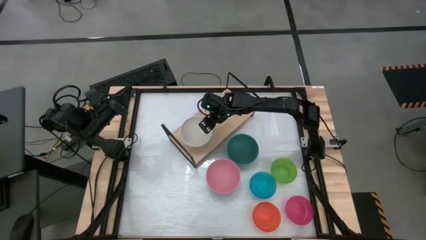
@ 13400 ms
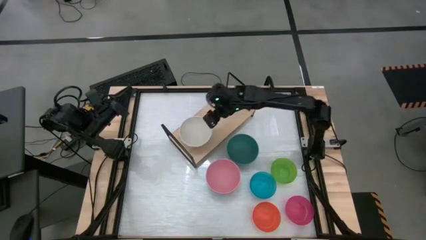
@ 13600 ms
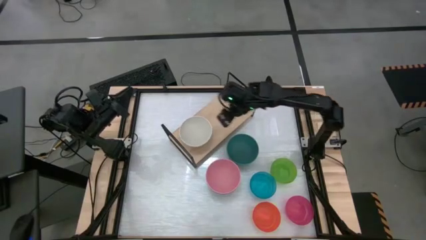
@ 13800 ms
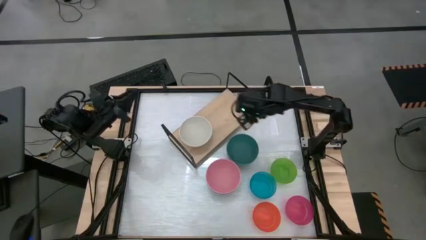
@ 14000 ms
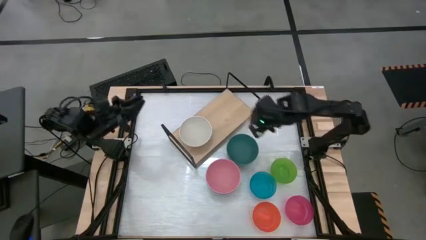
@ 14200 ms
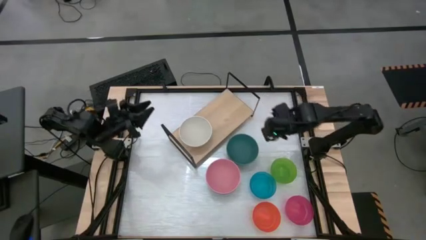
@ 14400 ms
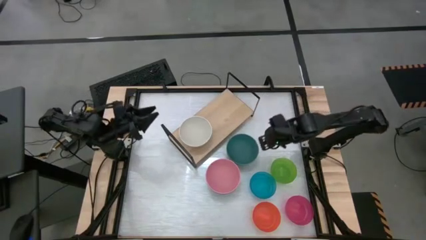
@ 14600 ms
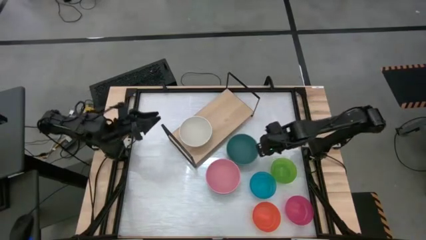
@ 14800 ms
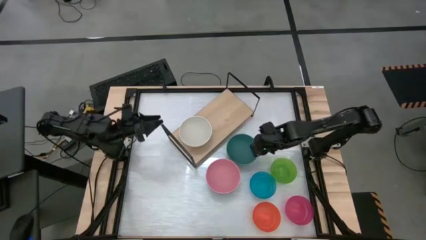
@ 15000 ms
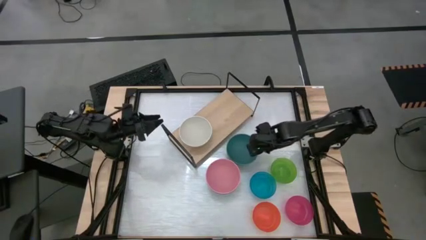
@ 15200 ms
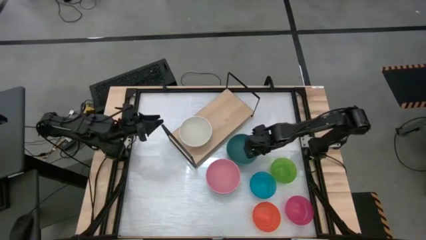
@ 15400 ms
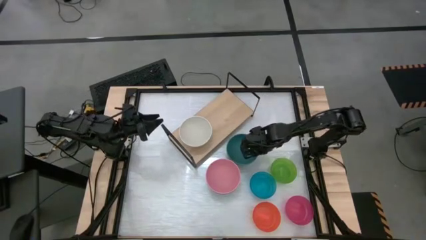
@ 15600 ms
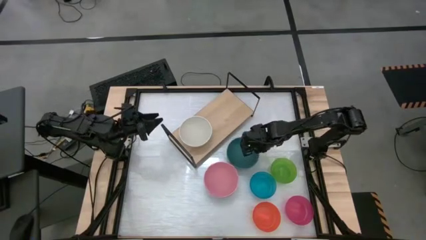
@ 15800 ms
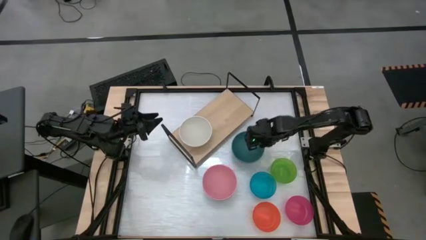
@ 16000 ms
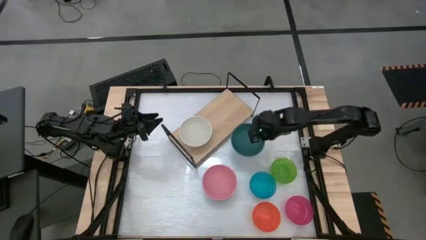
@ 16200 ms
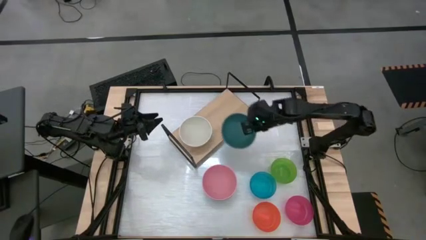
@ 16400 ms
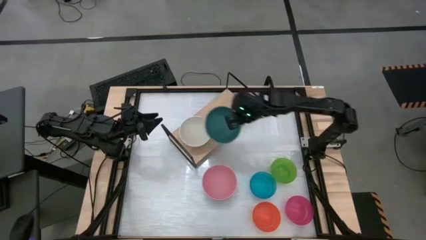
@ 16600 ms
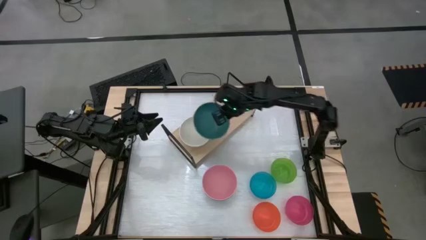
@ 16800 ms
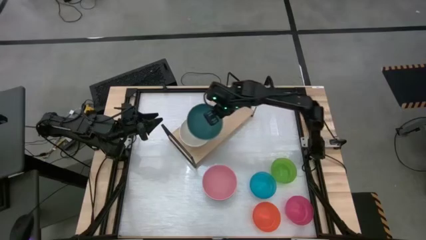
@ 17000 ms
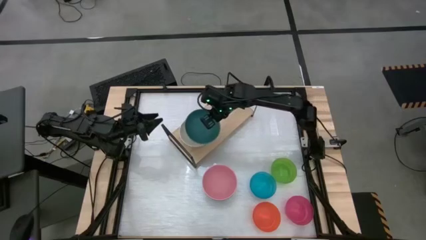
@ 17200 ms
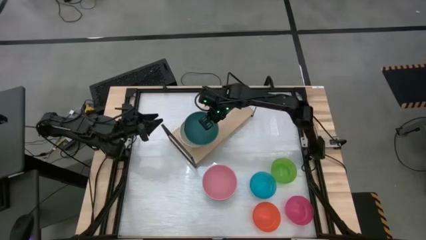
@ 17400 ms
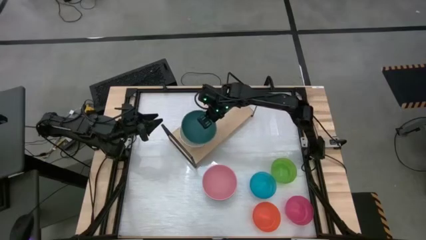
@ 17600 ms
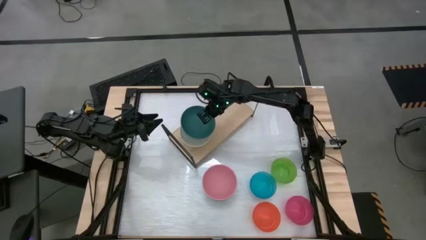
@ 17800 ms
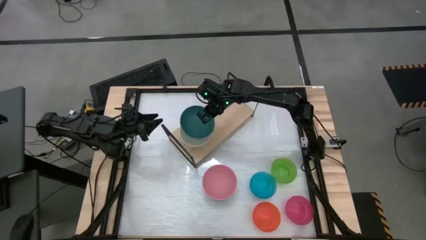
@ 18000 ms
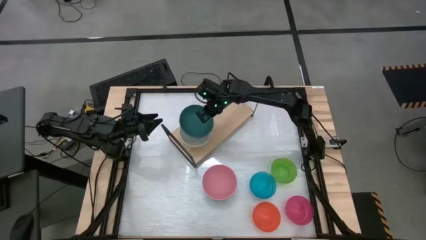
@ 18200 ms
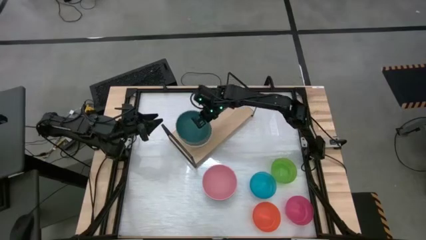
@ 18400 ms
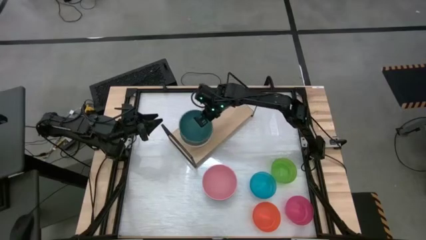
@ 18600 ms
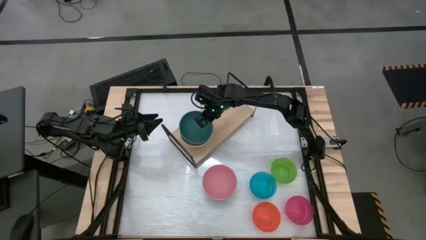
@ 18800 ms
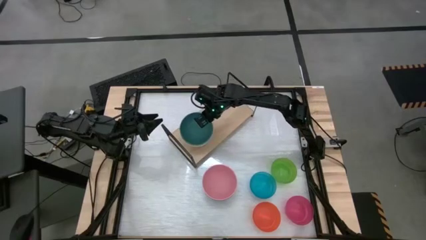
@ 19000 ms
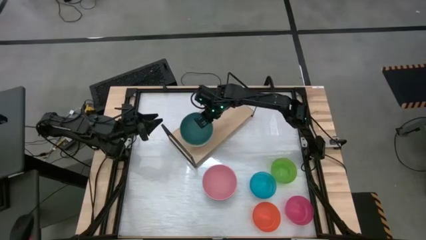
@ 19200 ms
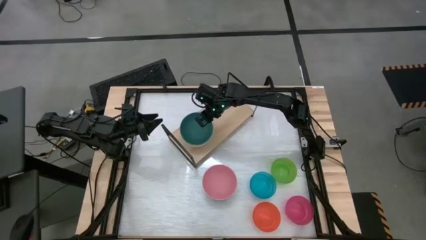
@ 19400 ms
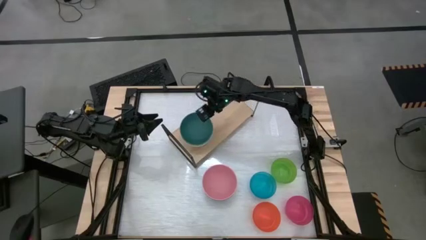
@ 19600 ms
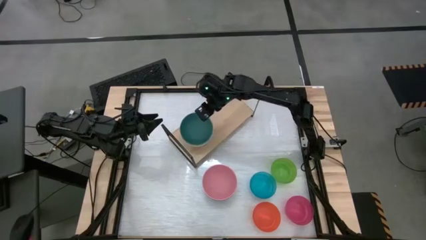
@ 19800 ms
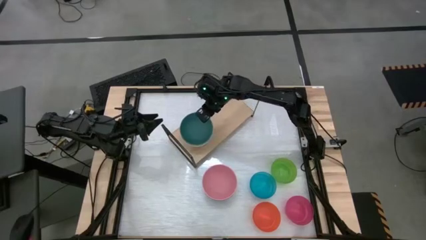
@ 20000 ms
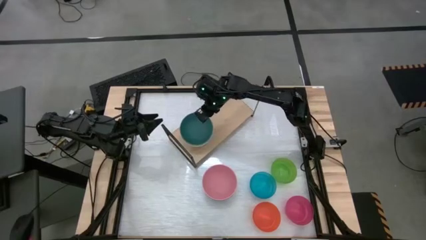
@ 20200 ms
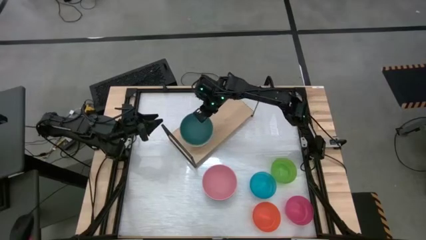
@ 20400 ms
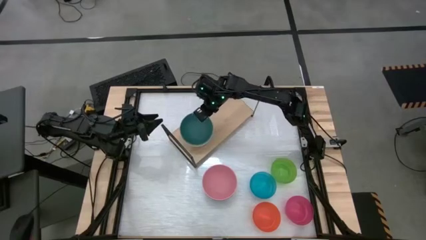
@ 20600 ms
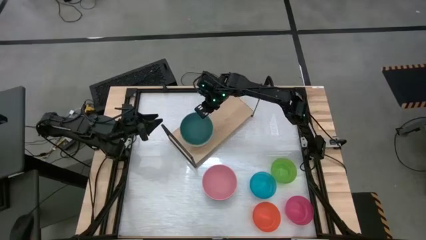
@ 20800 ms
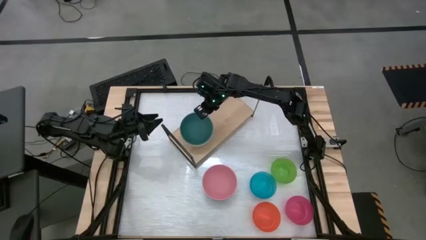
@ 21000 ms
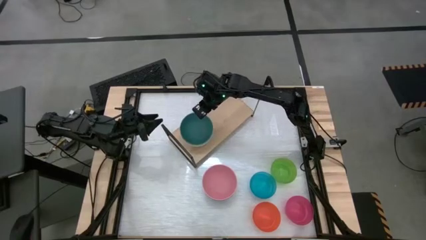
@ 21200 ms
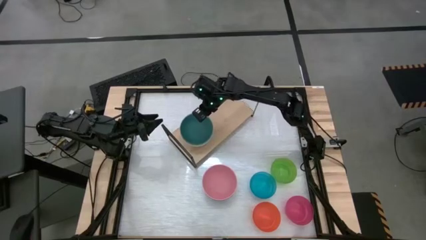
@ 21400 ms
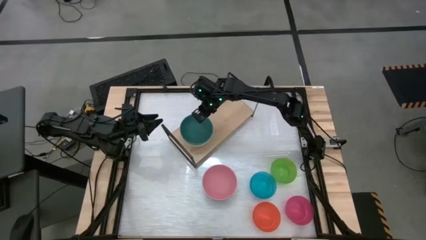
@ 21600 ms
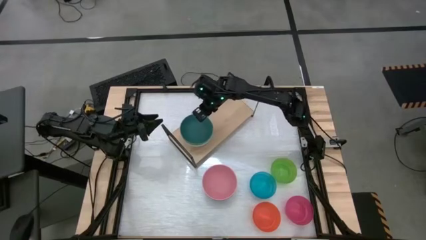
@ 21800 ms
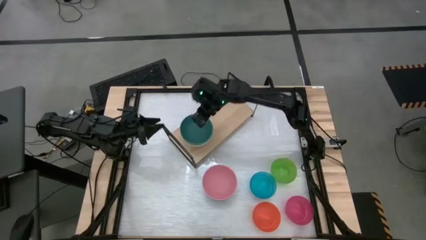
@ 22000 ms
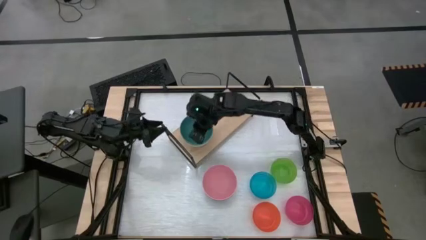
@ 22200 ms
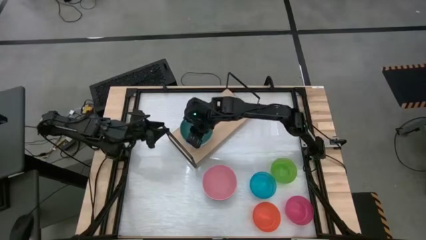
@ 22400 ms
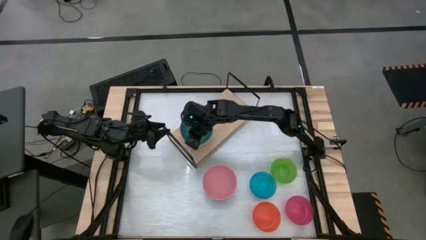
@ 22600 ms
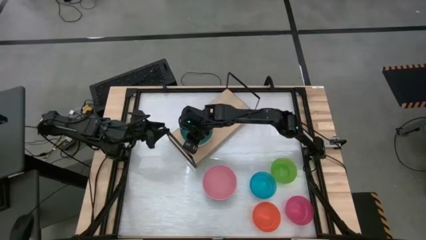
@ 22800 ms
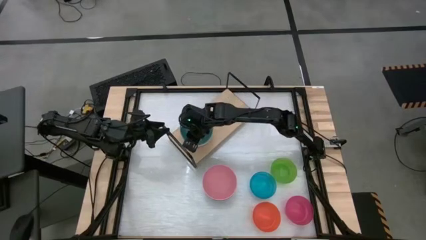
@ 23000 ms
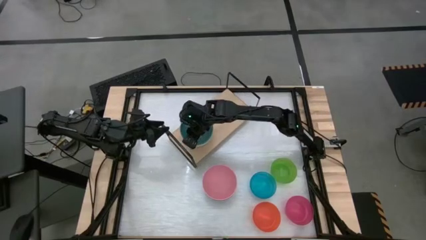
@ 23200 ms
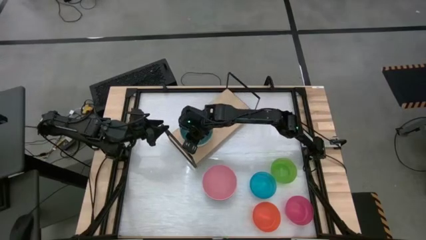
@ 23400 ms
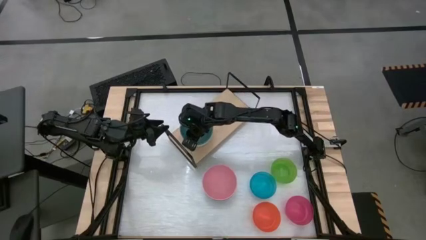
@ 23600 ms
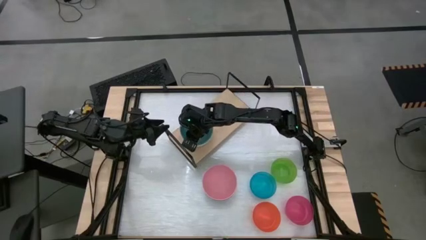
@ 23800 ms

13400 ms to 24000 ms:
Task: Place and stack bowls onto a shelf
Stack the dark green bowl on top of the white bowl on the shelf
